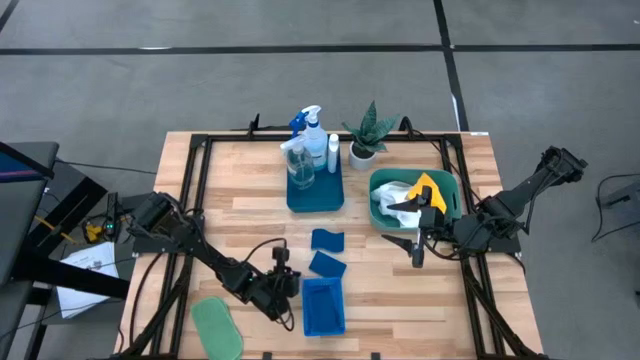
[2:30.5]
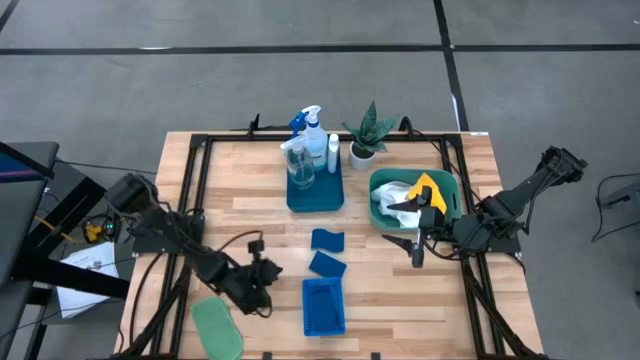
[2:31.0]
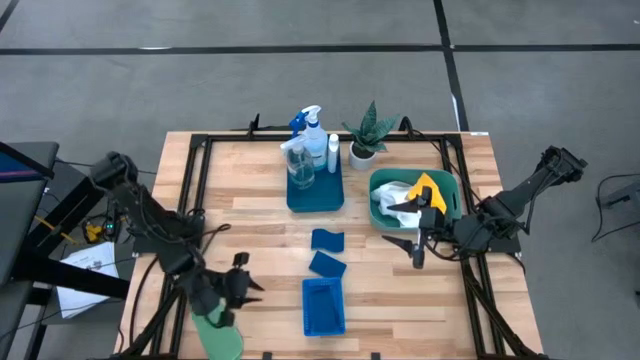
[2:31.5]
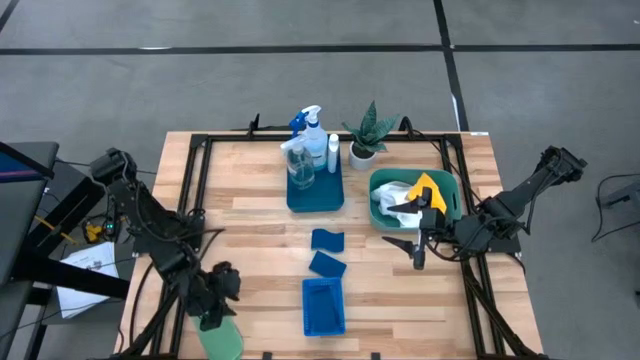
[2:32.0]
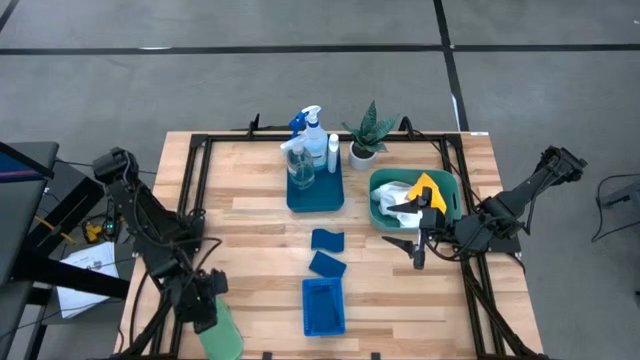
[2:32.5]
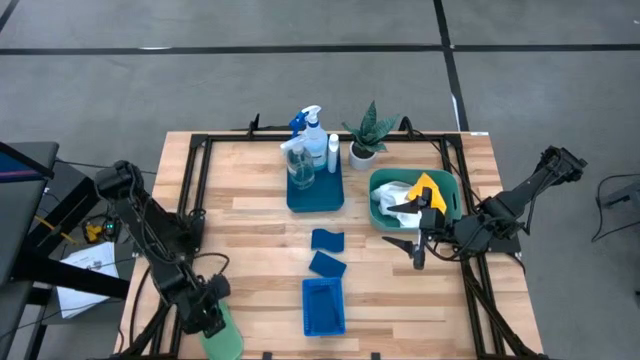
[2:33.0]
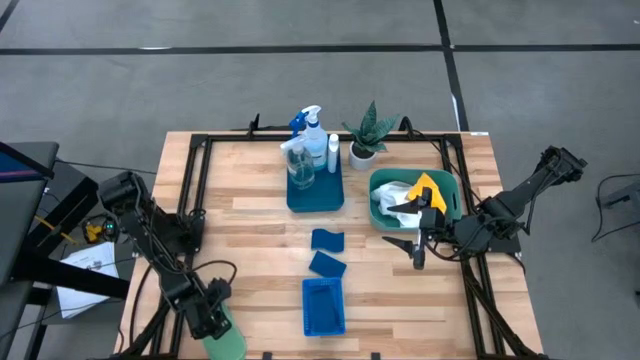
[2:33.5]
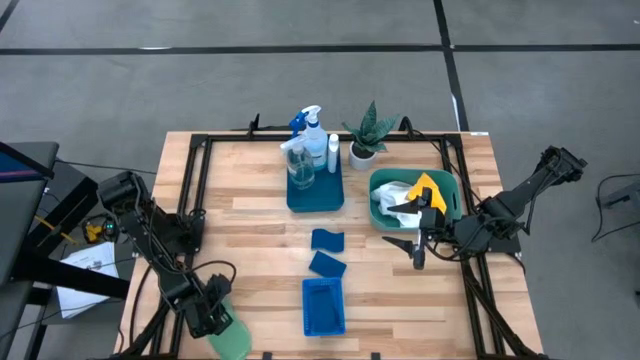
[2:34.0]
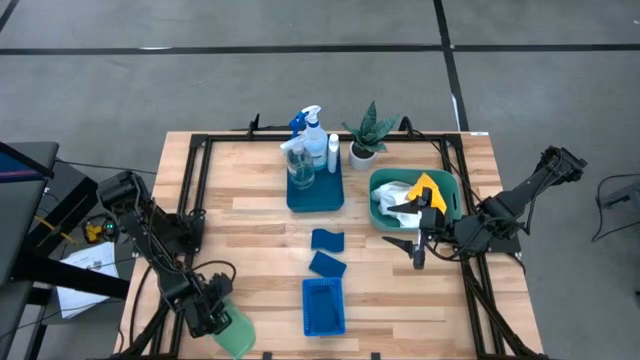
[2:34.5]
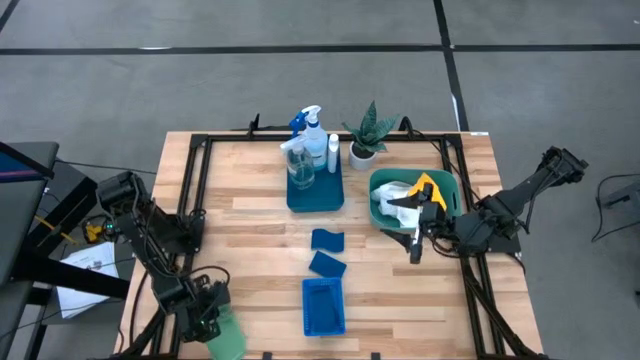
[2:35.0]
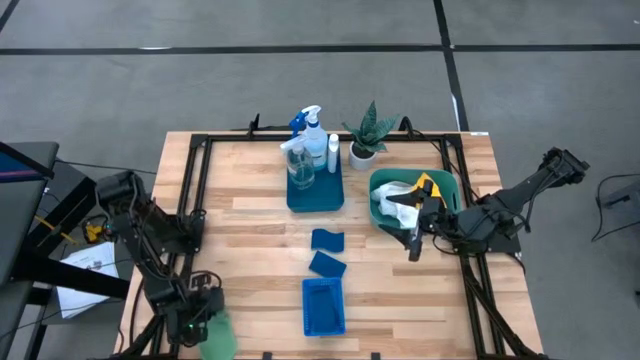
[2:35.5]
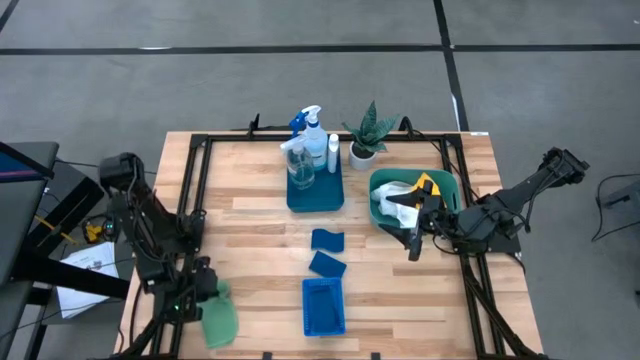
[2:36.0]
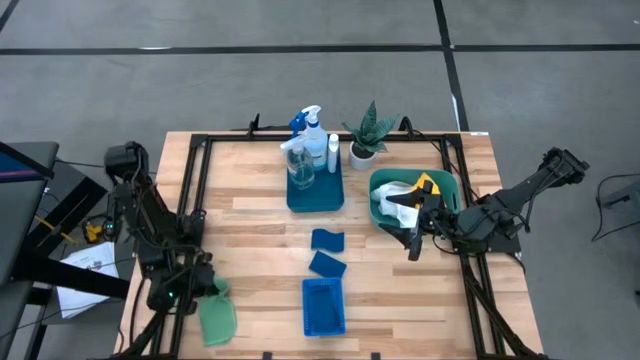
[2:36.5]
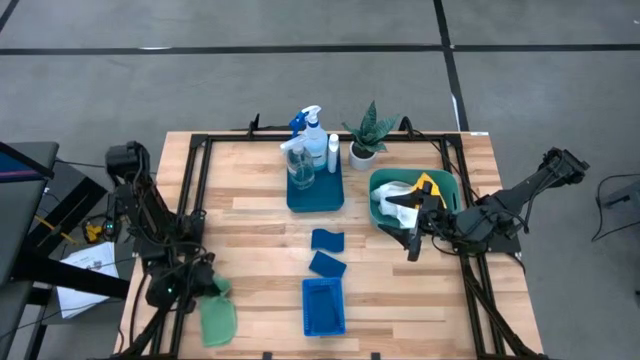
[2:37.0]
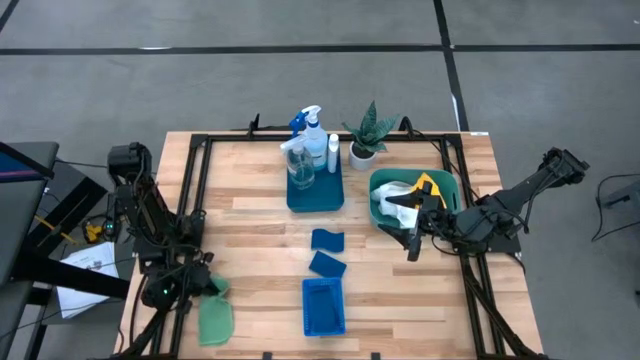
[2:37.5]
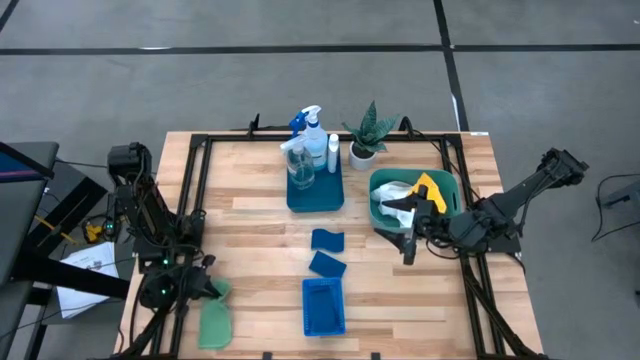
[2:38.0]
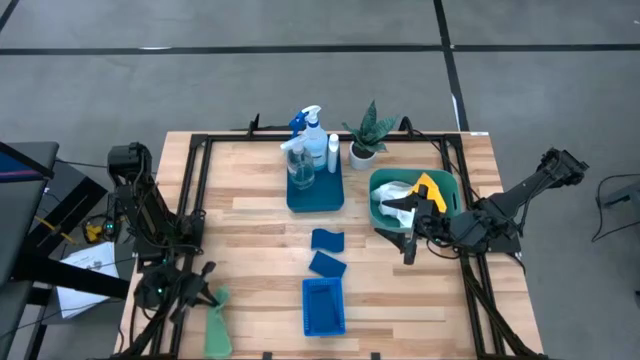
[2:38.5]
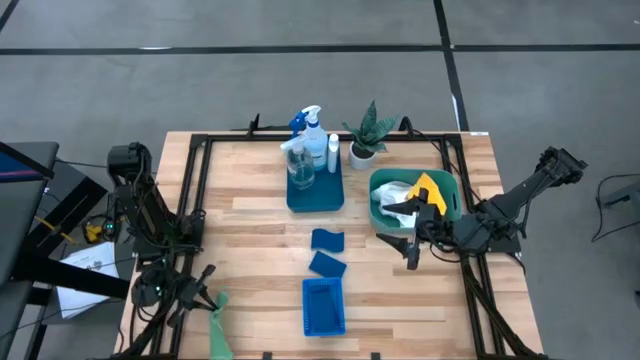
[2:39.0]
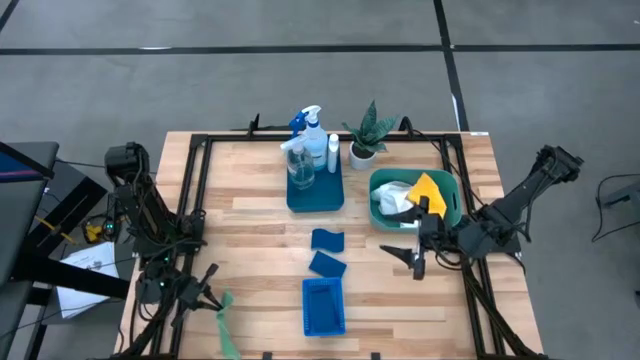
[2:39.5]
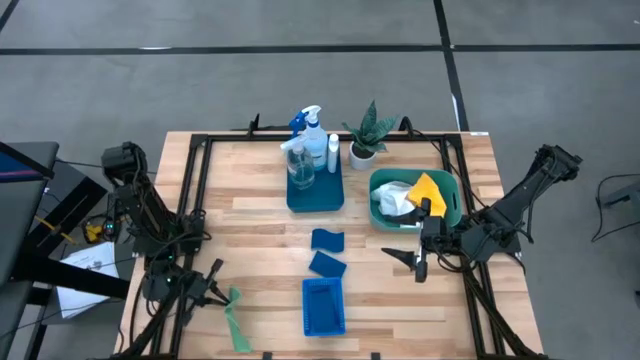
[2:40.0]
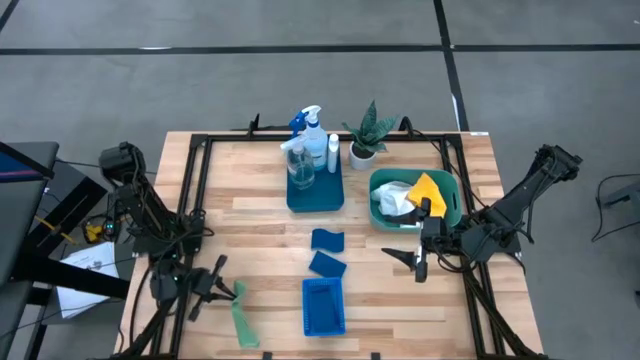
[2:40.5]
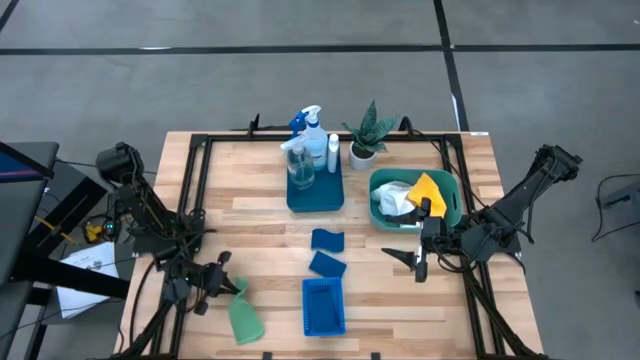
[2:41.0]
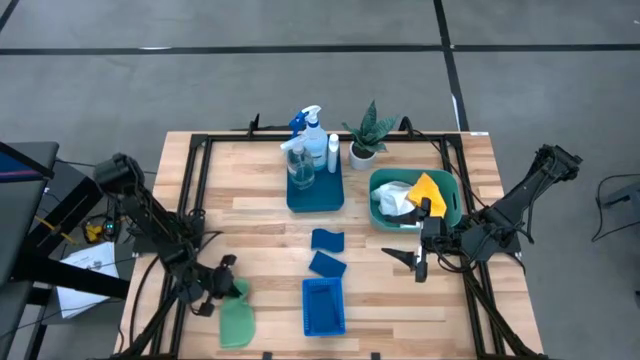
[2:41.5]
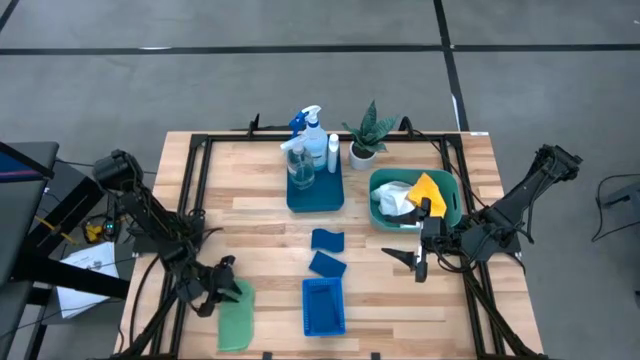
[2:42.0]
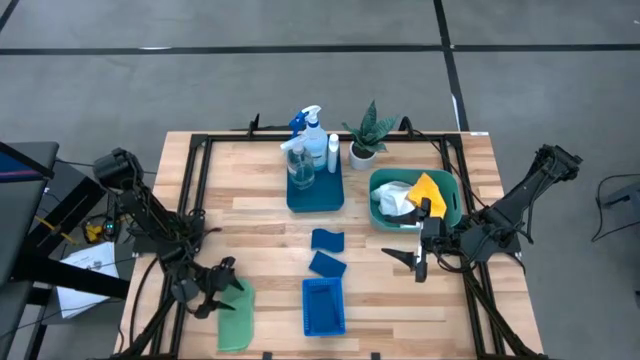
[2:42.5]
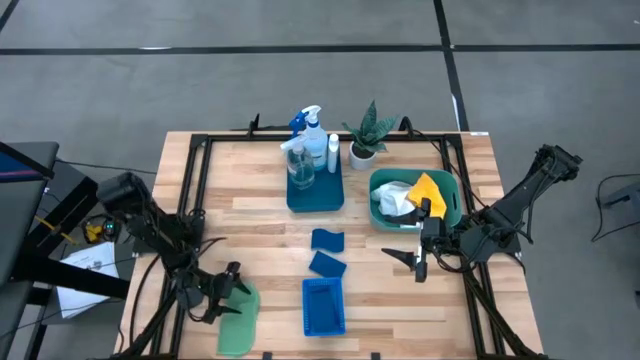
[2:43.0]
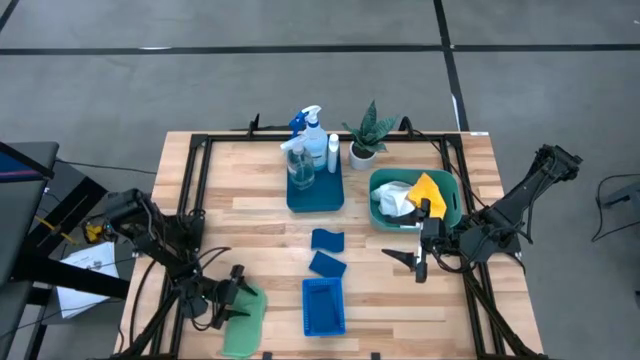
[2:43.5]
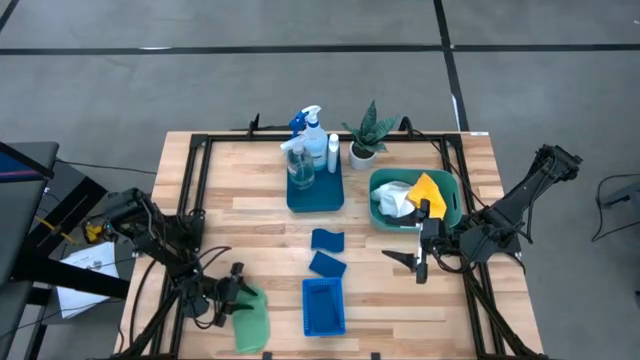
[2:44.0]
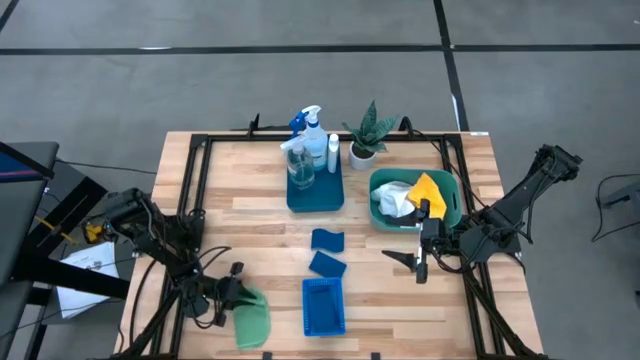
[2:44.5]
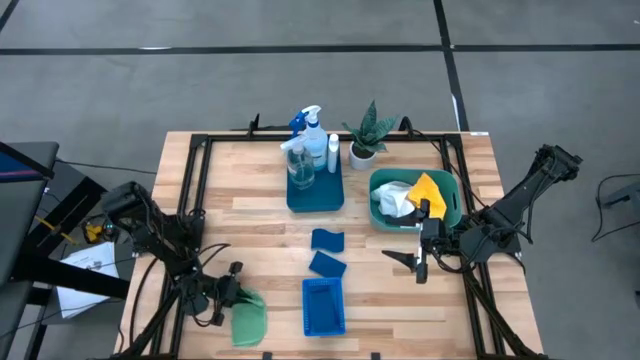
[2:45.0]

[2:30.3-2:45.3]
Task: Pick & Place Kitchen Items
Put the green microfiber towel into the green bin

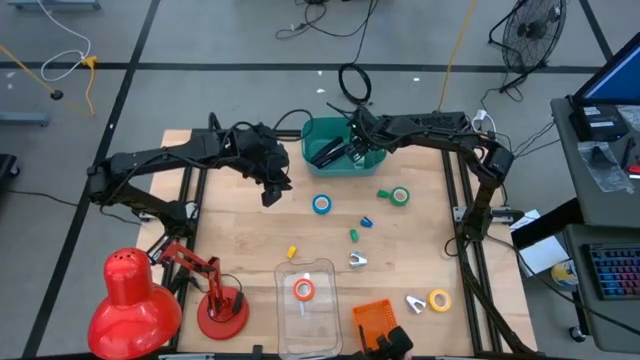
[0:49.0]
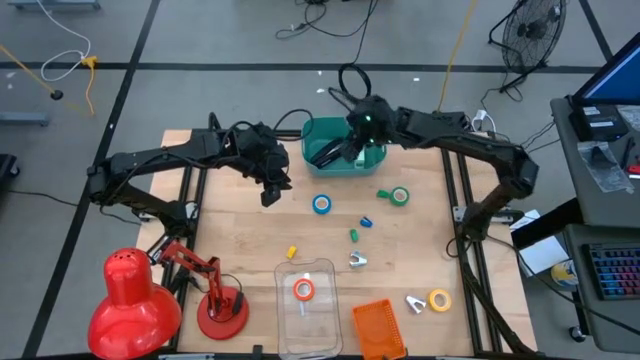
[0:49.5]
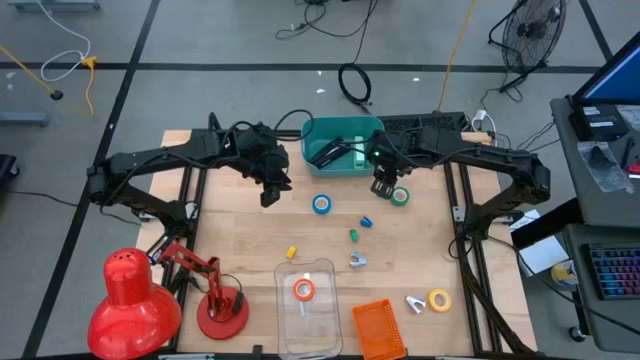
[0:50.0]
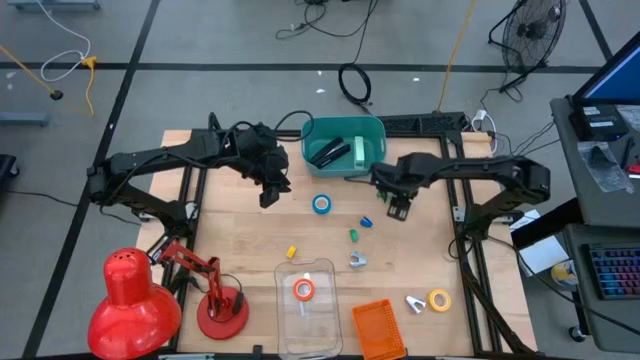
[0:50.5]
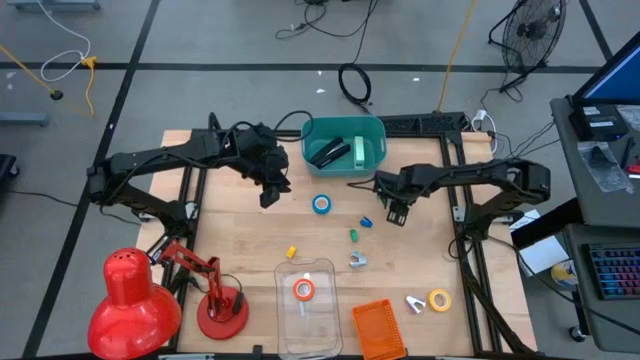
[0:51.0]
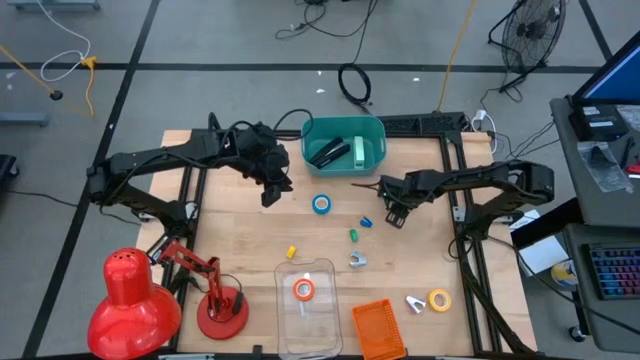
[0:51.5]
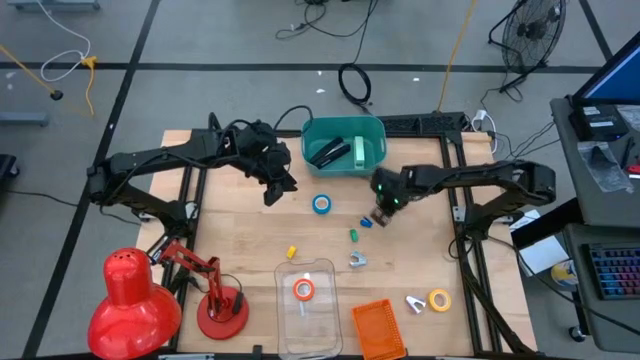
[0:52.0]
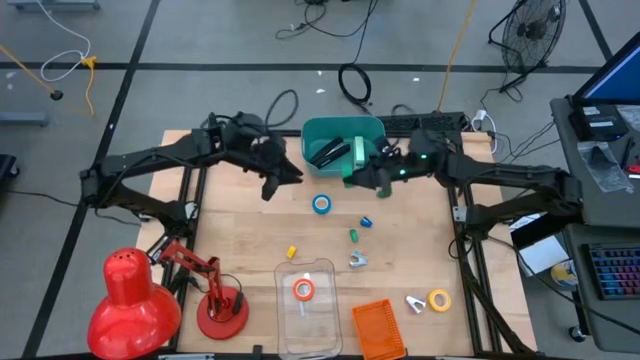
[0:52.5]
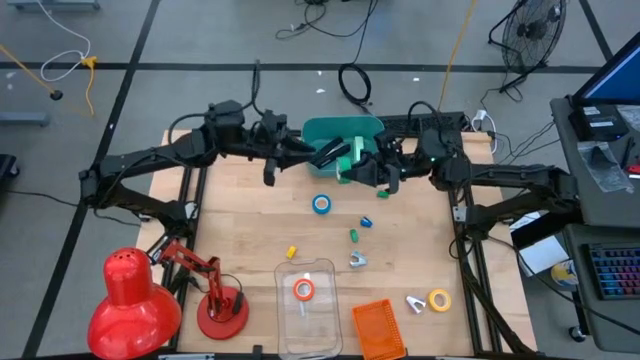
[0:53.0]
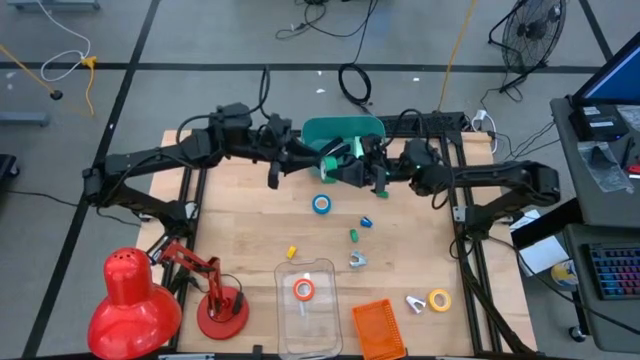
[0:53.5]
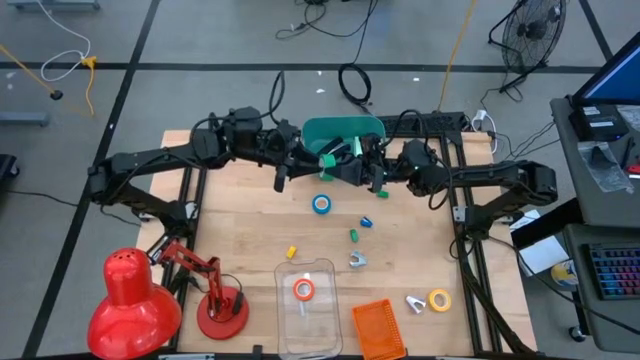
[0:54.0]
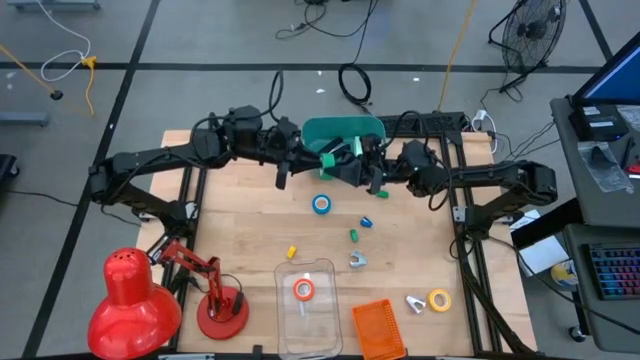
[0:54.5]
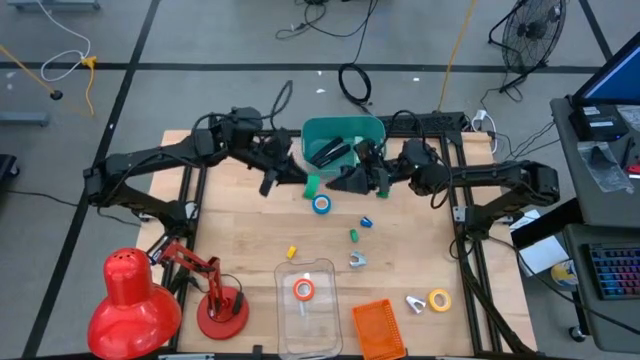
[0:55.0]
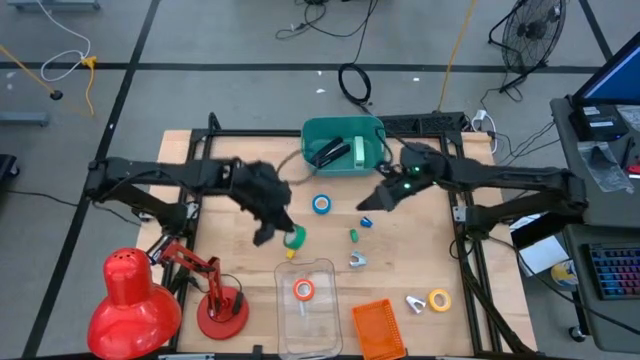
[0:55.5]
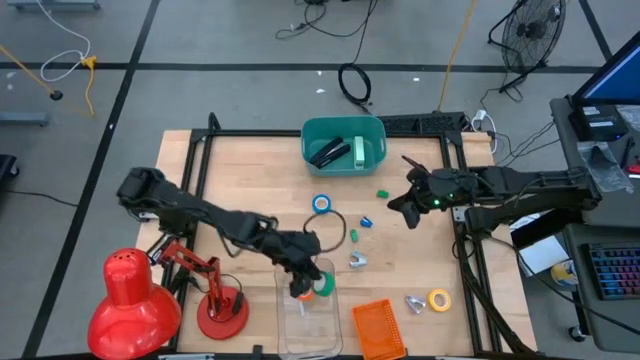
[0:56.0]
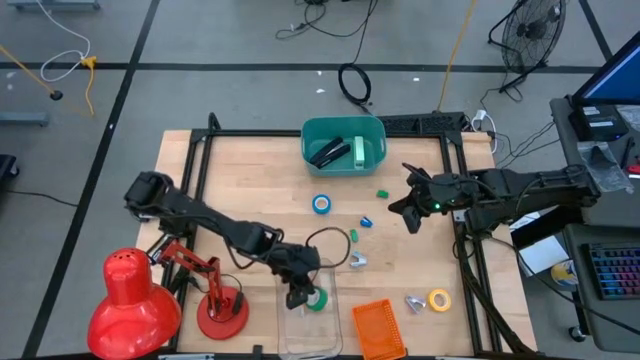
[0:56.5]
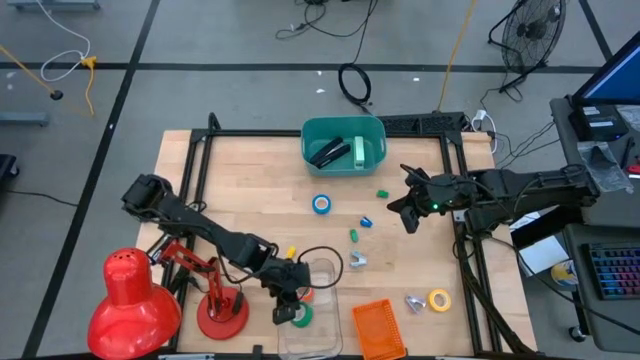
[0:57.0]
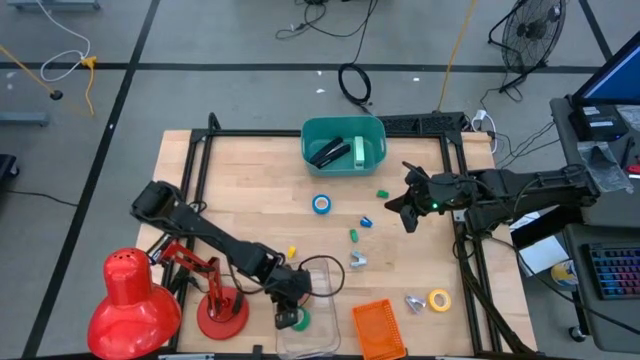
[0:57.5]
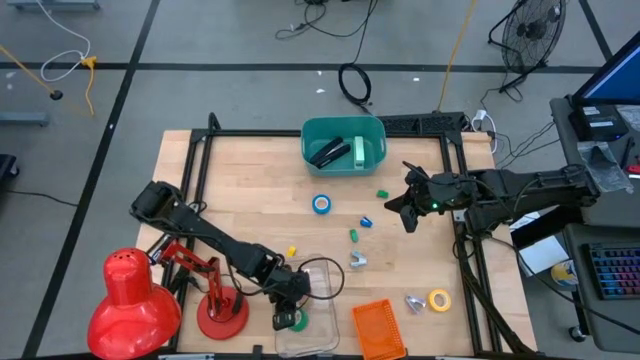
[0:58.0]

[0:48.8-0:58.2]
Task: Pick and place Stapler, Stapler remover, tape
Put the green tape into the transparent bin
